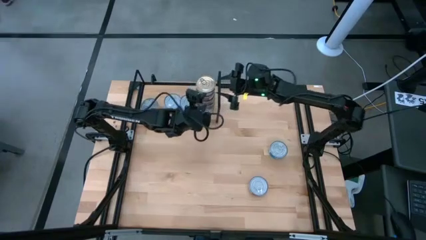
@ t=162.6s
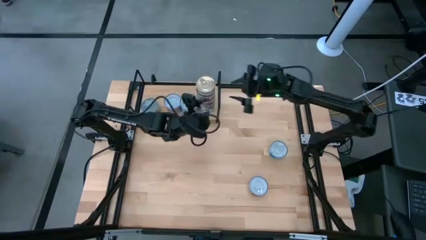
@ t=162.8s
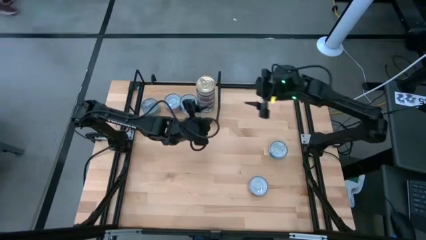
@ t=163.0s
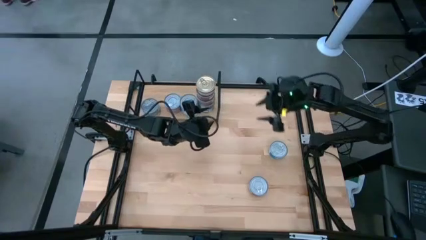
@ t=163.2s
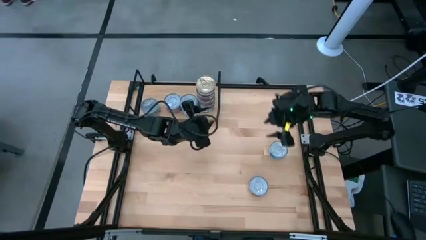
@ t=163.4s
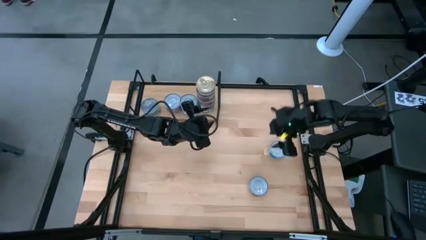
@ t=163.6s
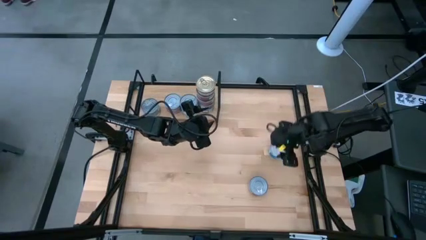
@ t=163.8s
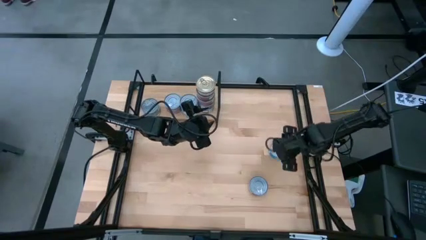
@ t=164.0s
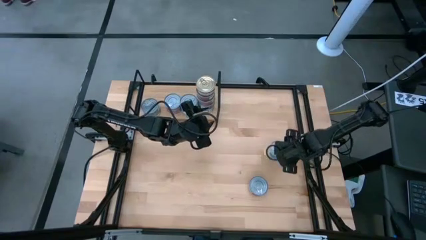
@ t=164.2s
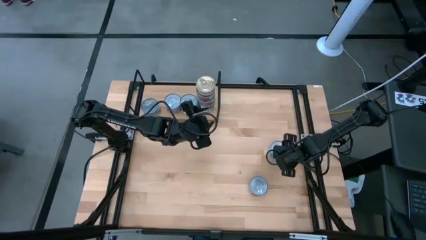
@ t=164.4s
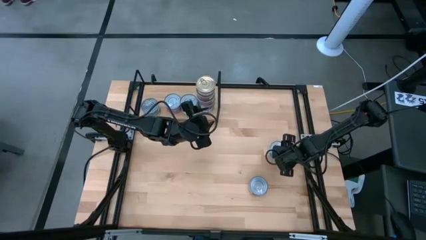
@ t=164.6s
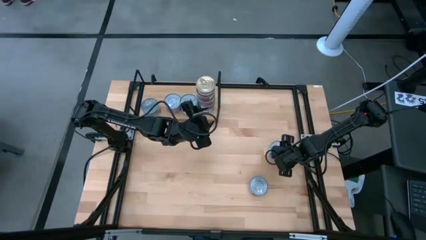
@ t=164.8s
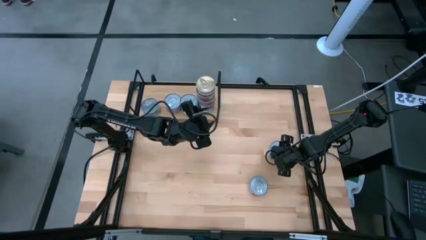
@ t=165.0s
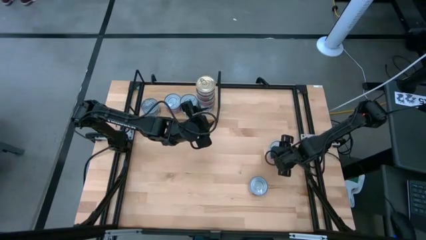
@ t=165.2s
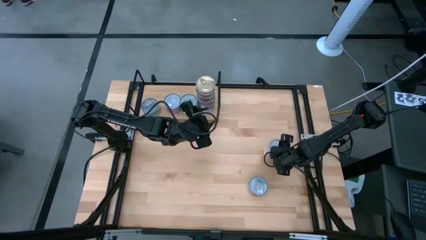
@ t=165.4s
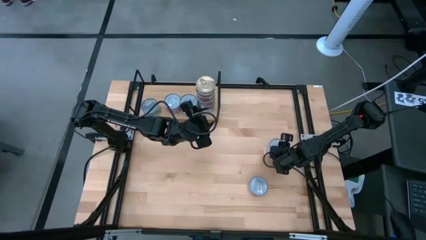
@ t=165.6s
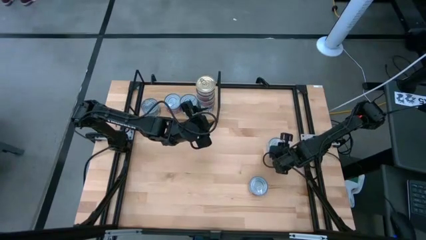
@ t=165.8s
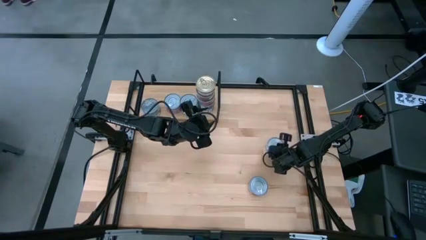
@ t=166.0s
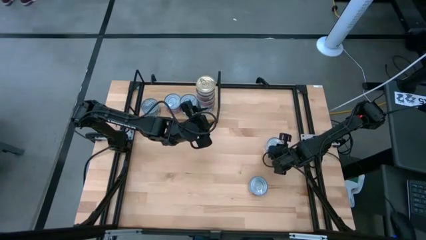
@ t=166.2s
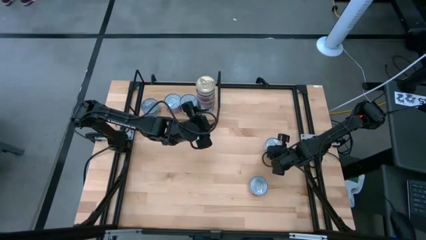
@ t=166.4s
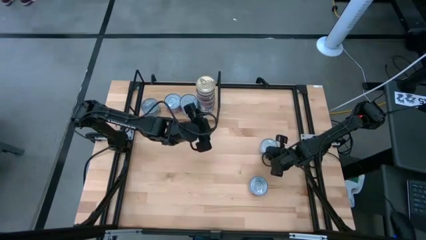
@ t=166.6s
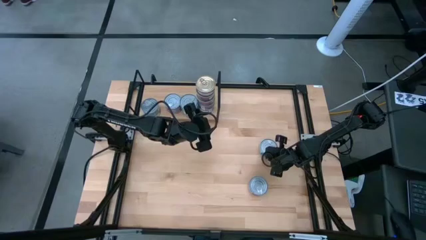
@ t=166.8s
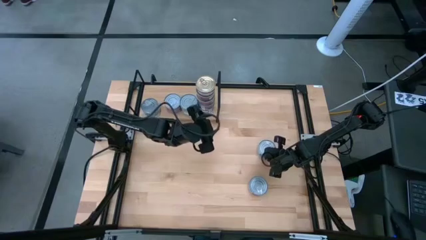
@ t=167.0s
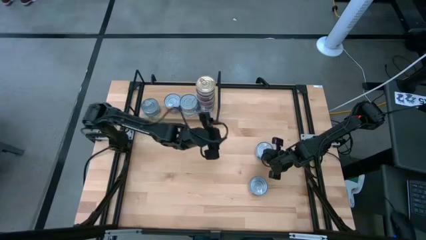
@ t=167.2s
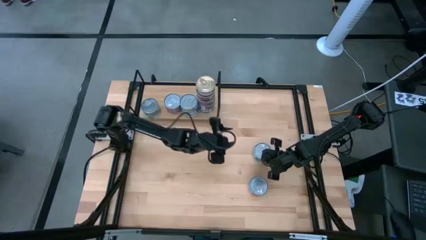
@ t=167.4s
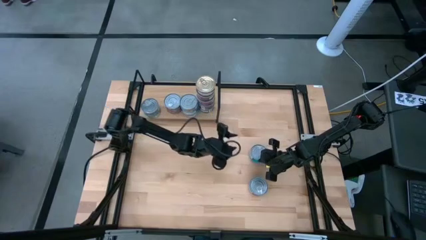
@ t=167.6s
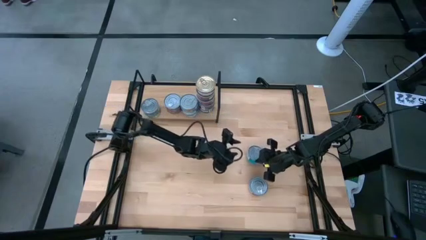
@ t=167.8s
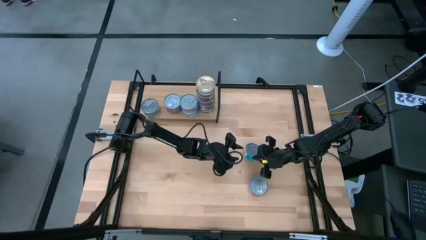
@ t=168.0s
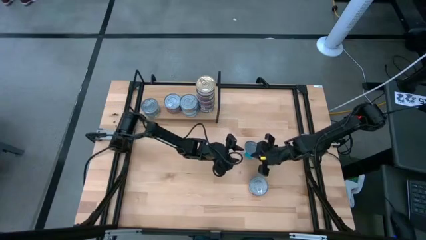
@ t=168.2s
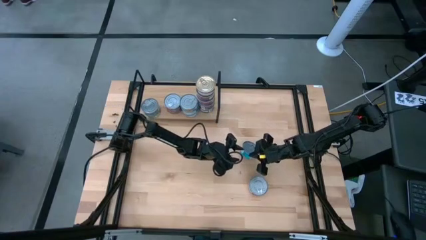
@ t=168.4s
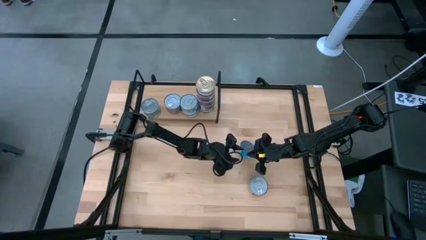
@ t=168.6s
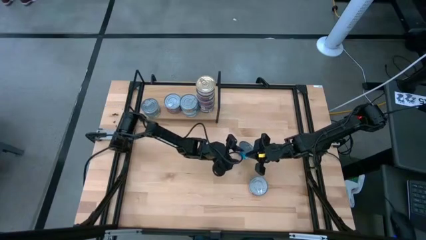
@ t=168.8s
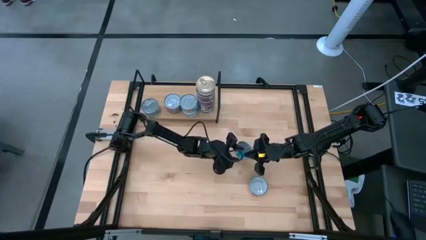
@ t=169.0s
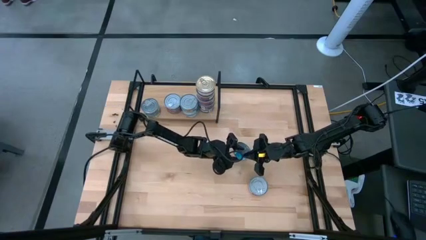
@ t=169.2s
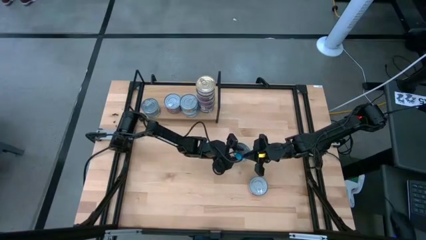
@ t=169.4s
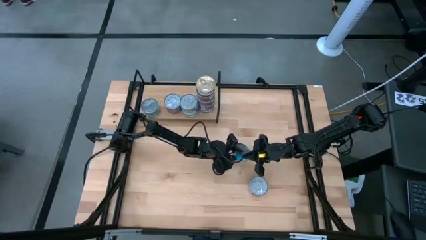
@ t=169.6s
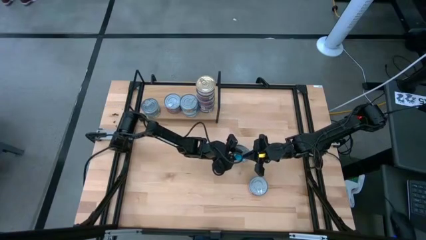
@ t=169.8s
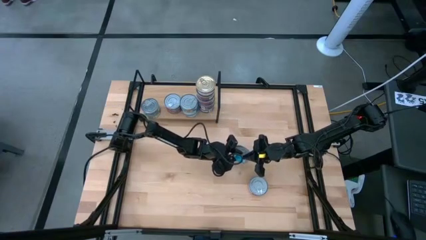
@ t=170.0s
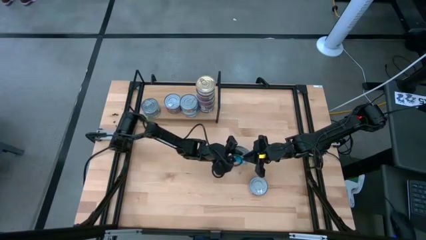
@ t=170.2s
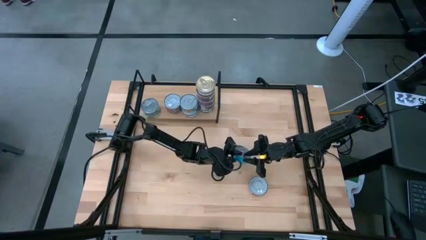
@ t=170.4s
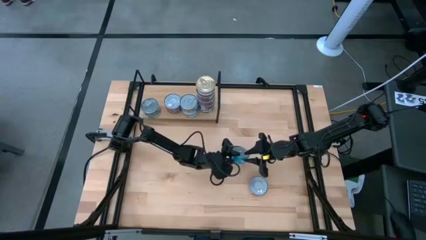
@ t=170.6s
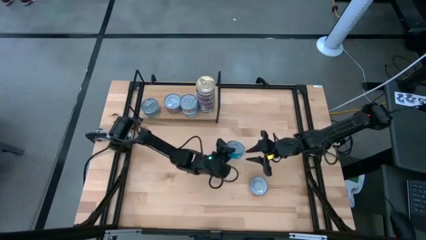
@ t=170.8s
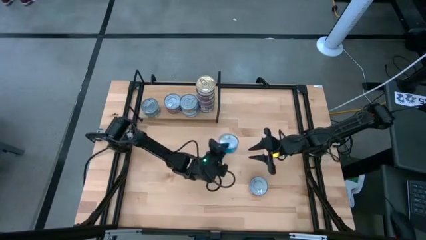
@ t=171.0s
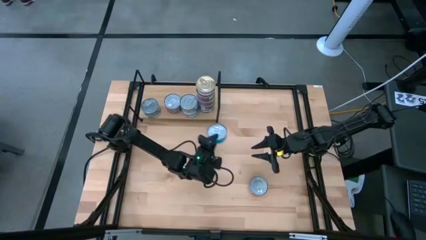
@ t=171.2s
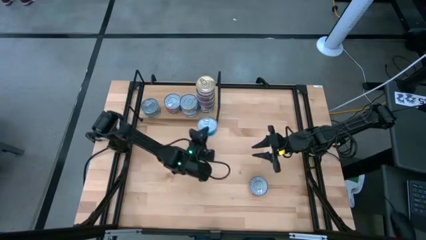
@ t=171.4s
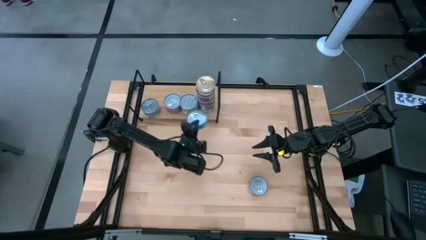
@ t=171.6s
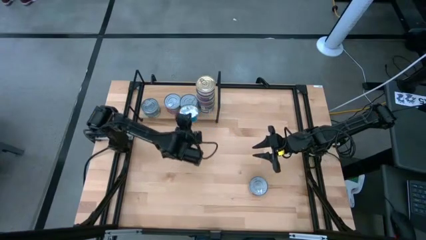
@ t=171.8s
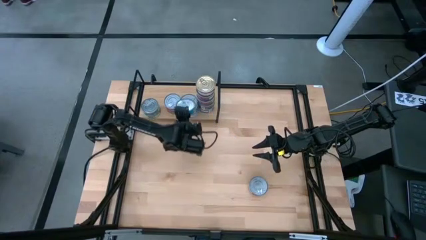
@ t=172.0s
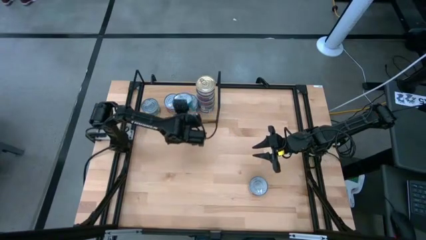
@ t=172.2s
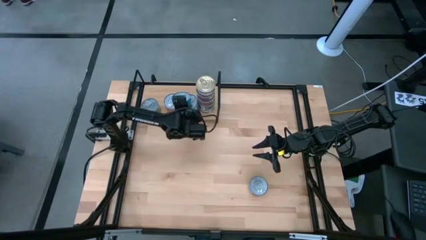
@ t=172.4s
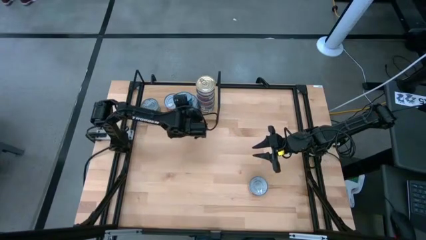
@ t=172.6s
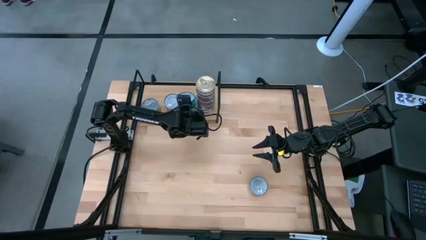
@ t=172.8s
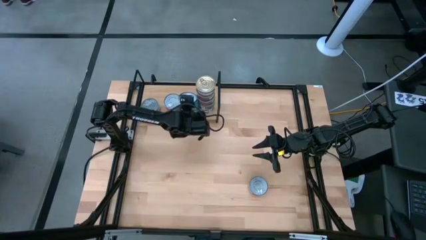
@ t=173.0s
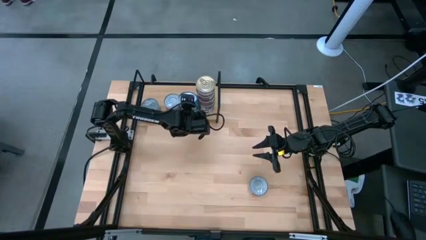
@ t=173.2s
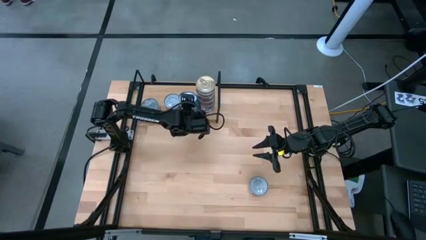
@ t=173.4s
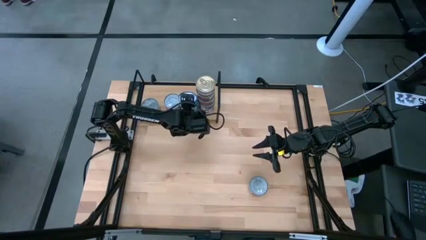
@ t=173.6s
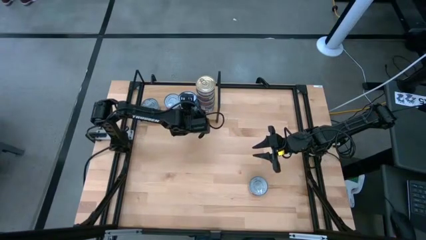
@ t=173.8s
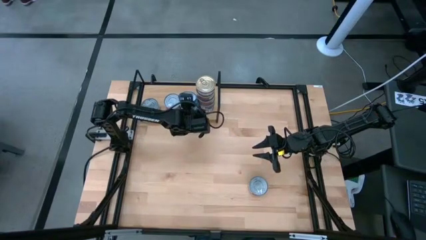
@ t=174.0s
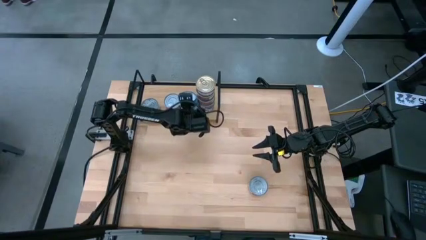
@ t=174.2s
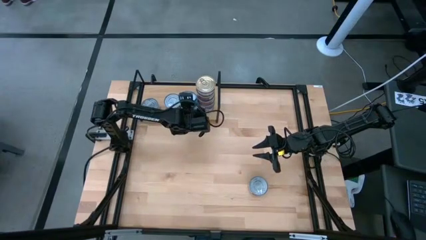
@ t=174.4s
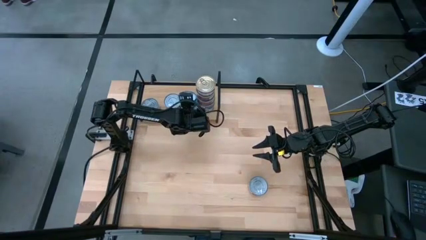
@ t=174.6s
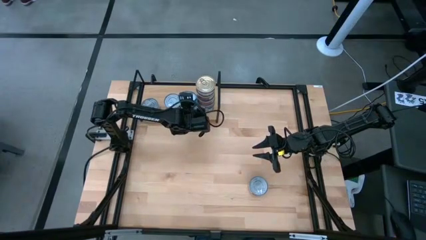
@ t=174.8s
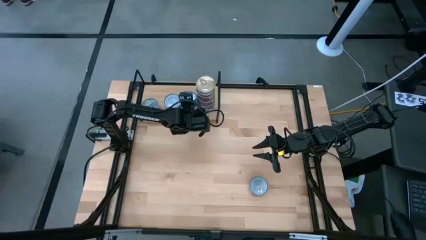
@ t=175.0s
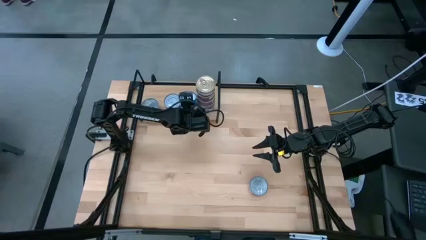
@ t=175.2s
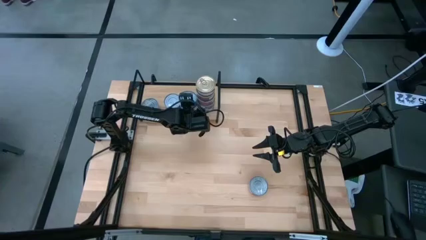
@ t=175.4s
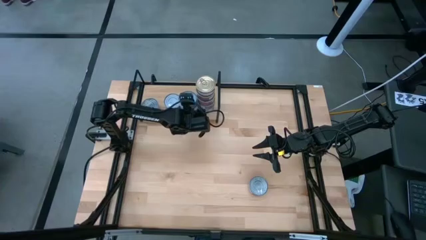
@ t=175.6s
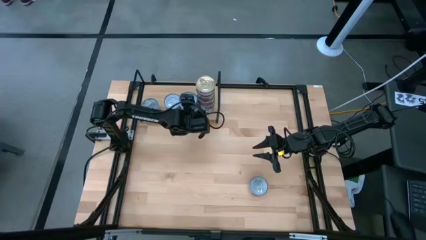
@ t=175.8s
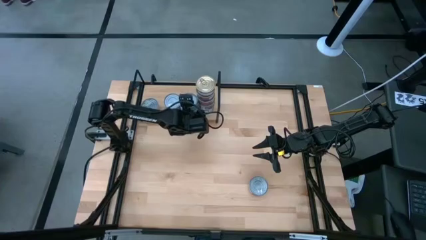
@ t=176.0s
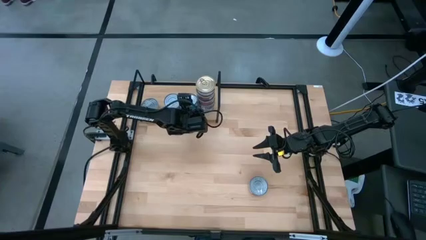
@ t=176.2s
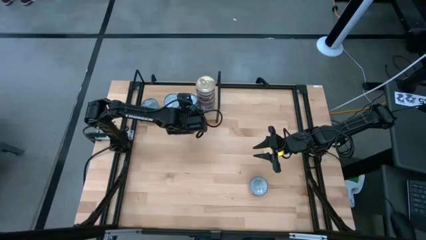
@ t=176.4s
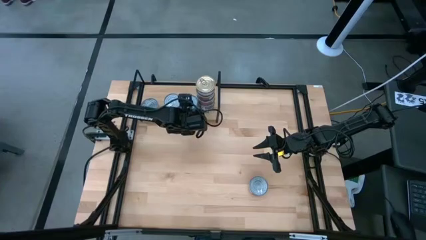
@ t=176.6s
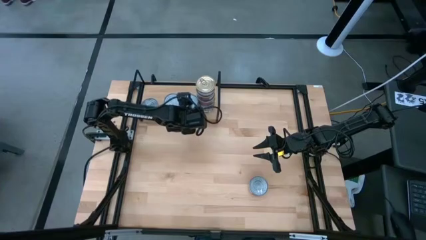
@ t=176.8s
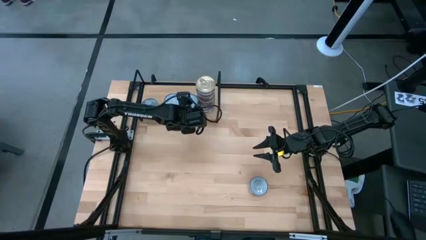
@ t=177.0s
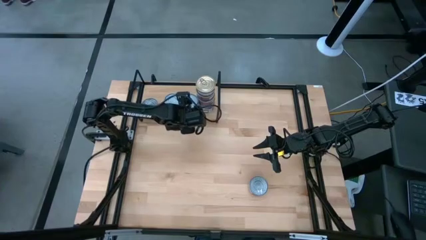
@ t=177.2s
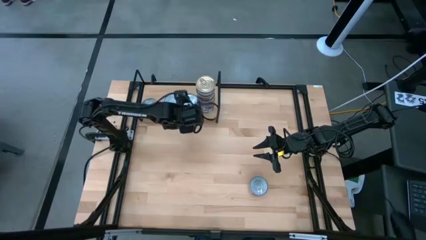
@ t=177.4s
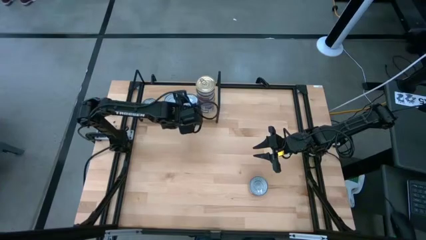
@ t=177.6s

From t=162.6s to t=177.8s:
Task: Stack canned seafood by type on shelf
Stack the yellow blue tuna can on top of the yellow blue tuna can on the shelf
